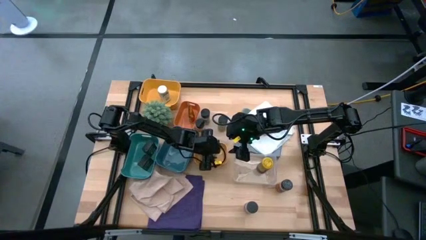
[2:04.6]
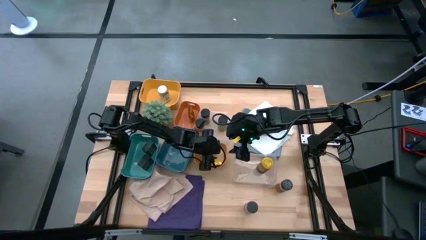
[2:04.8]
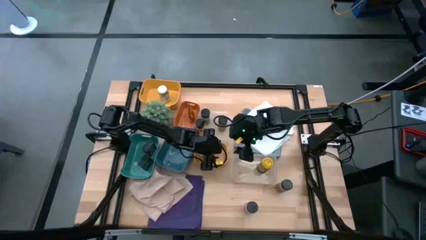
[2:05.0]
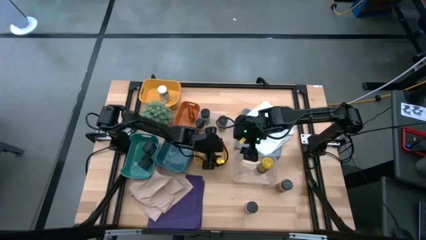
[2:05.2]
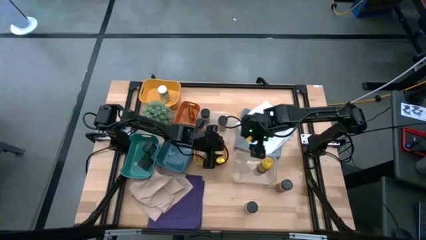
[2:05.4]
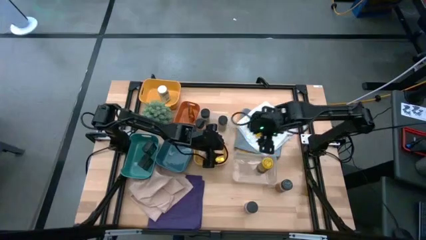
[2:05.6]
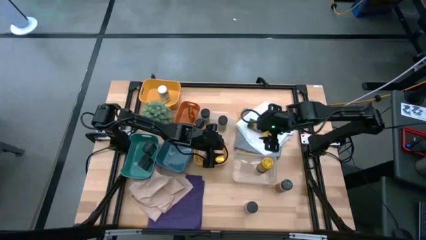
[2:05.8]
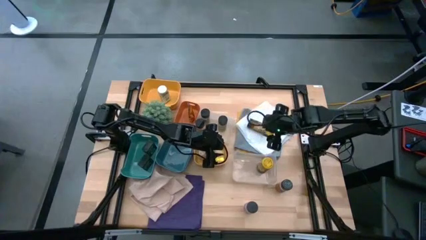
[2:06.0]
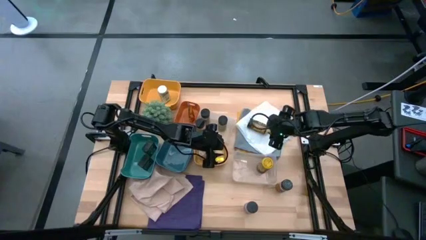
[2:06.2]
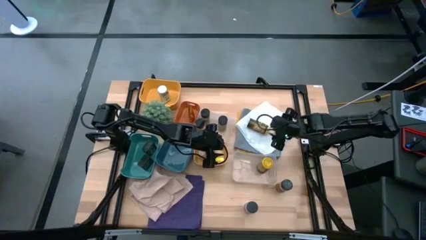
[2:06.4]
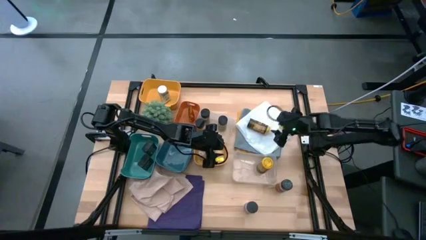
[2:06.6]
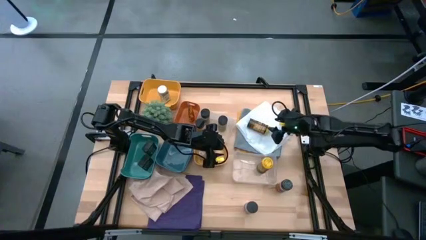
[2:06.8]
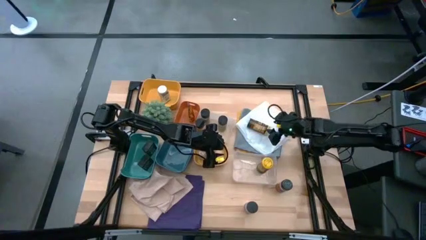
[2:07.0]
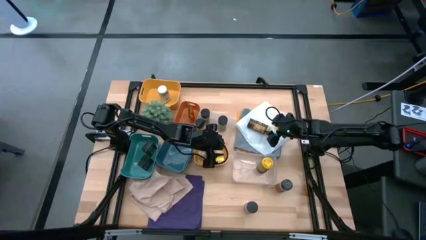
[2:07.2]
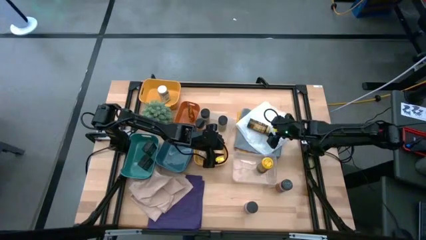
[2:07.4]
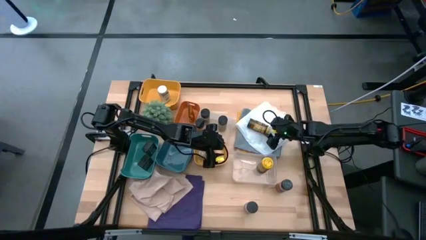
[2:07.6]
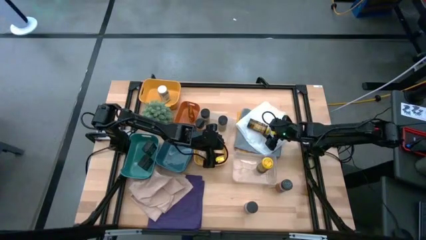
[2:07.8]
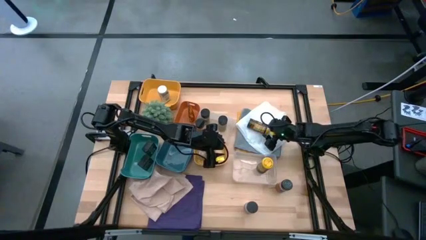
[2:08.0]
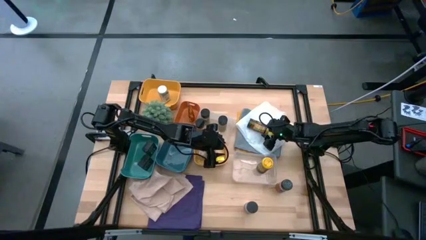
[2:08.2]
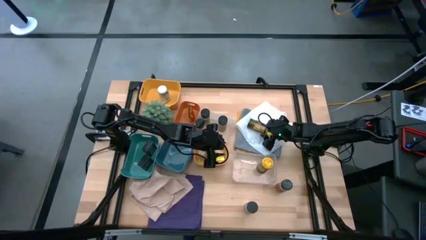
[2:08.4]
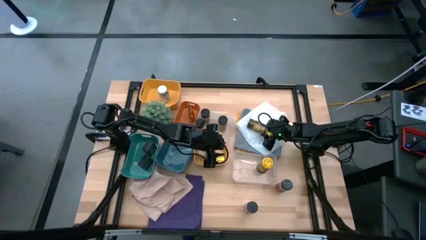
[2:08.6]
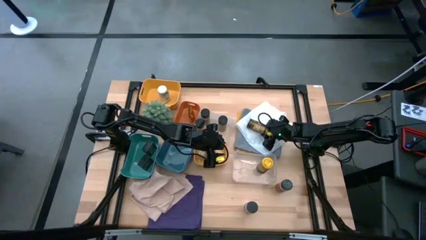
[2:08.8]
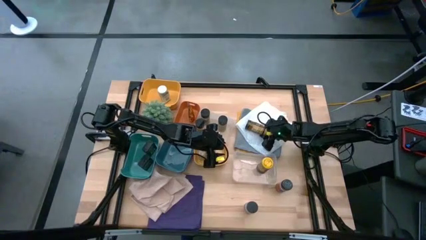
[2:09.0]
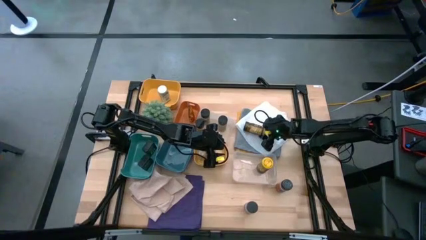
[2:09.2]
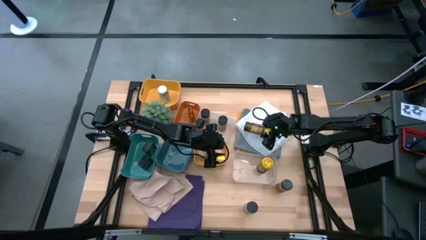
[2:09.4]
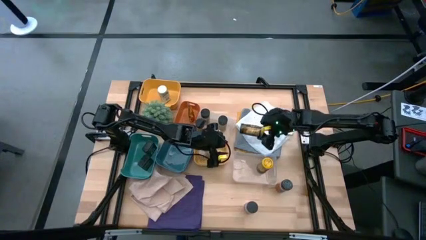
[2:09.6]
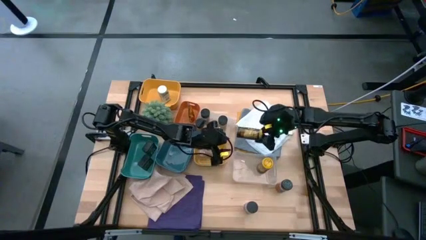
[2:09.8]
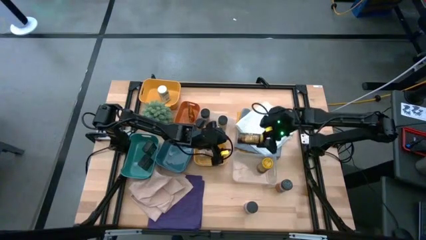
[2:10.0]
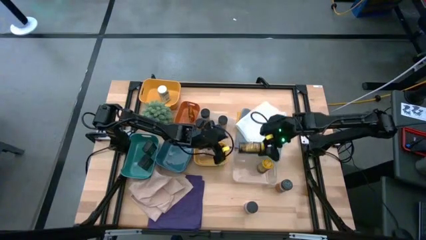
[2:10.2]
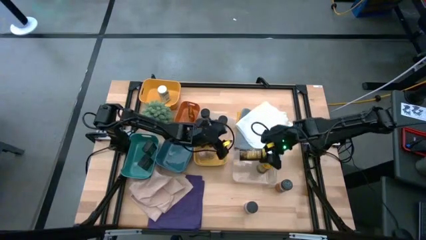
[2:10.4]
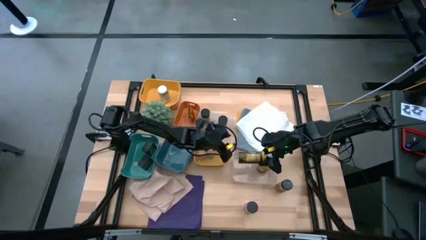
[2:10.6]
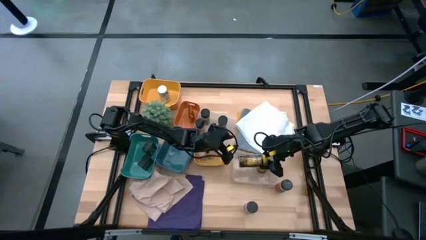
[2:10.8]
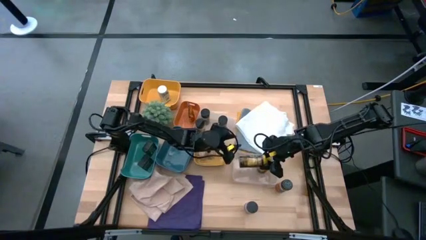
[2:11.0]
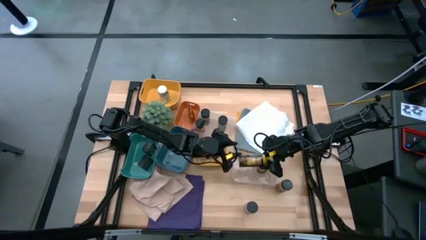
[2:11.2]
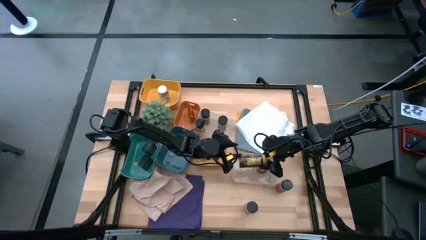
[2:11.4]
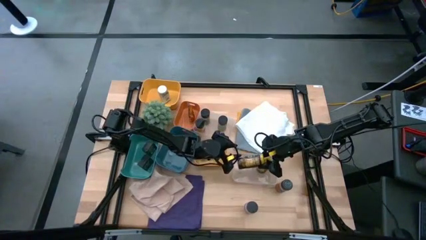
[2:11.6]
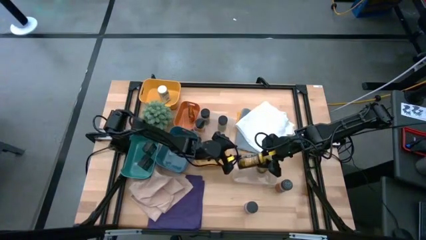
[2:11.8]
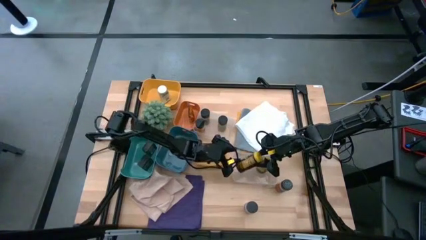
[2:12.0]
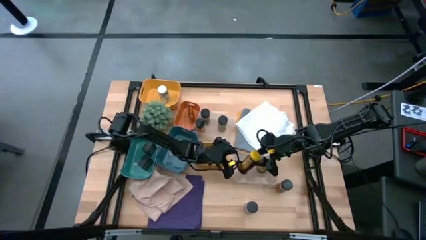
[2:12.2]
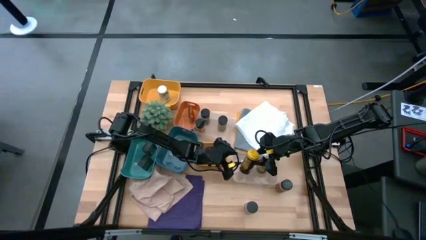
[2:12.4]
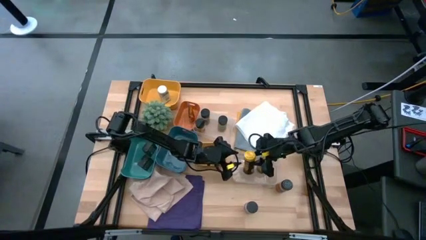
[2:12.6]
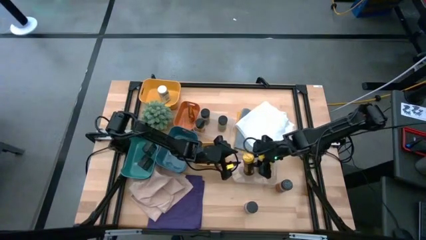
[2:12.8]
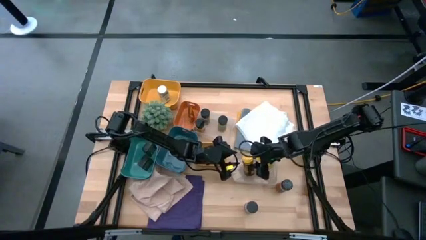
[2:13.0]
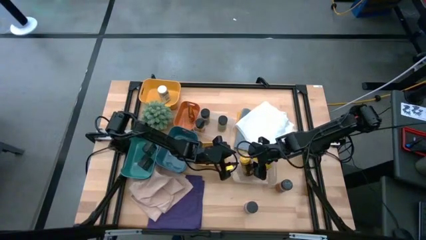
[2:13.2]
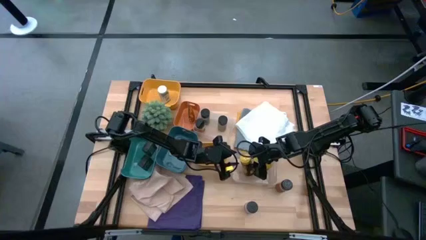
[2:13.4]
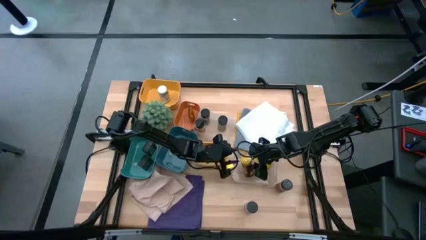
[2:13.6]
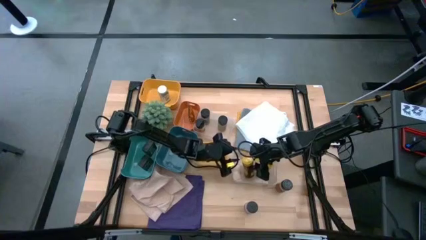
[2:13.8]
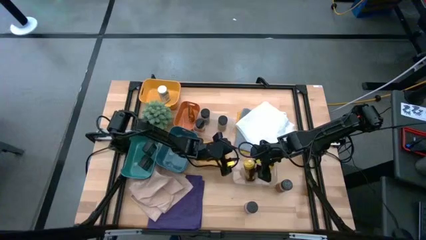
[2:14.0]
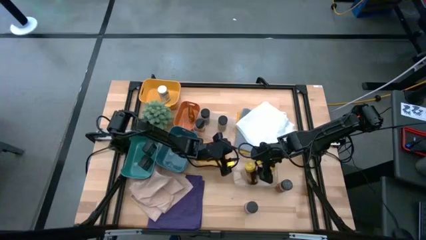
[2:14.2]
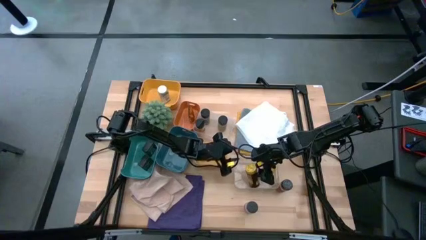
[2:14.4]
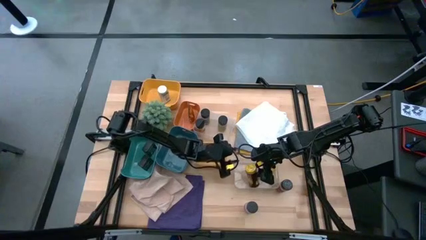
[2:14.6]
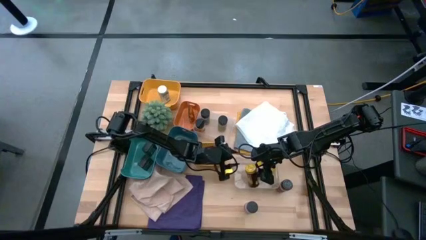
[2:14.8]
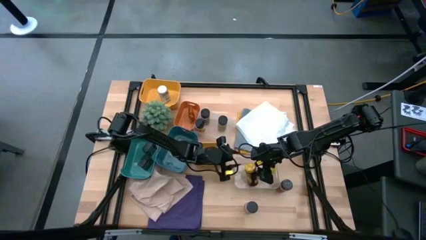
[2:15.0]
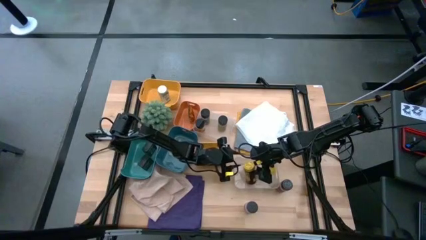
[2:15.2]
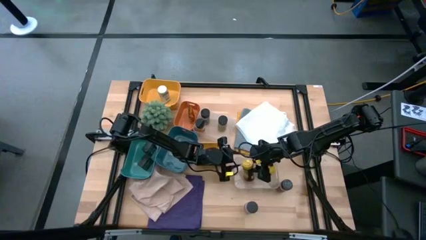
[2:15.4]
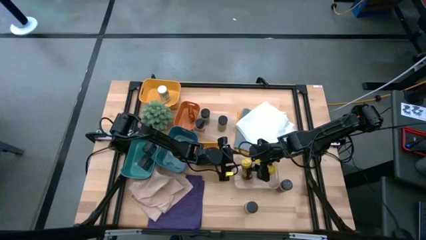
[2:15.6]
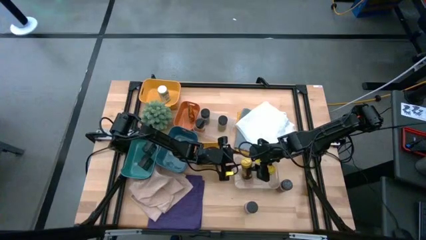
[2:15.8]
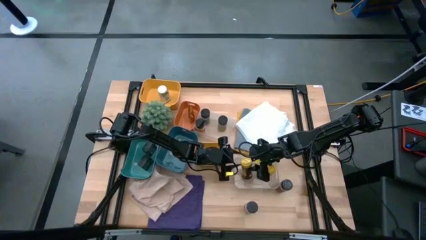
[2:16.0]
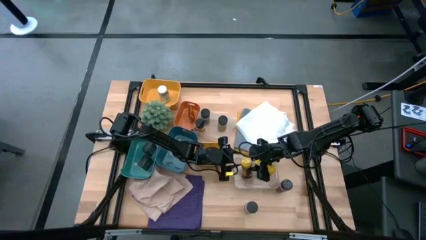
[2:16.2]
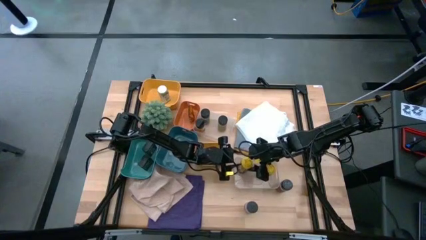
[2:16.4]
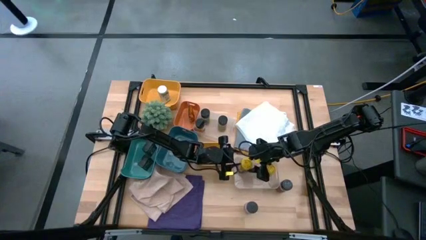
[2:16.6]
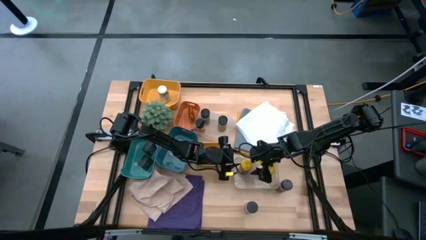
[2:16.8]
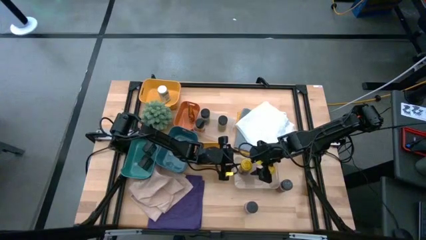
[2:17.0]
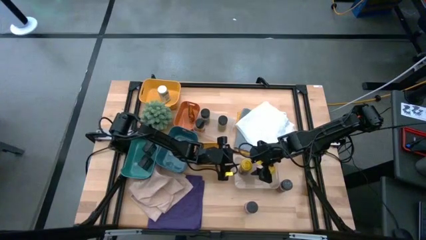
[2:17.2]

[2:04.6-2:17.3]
Task: Sort spices by type
Put the yellow seasoning bottle into the bottom transparent bin

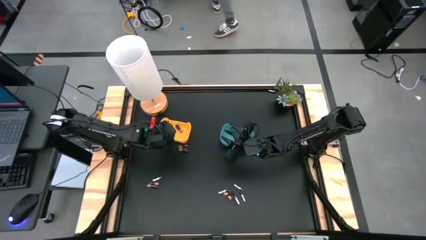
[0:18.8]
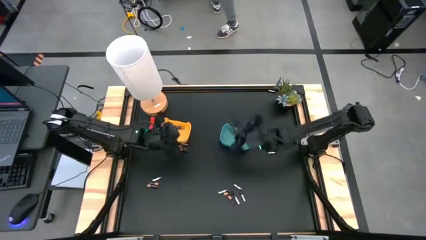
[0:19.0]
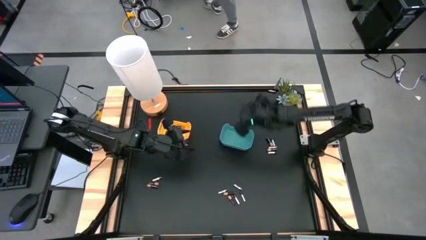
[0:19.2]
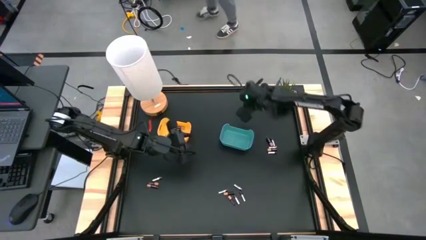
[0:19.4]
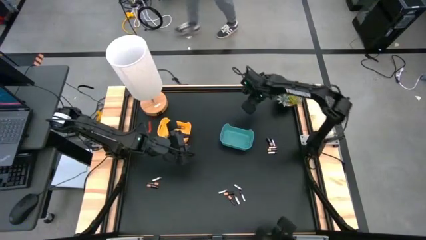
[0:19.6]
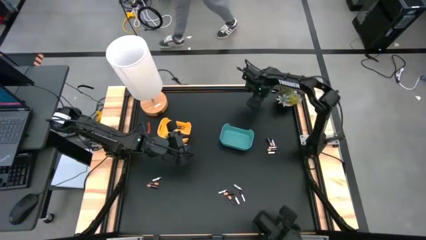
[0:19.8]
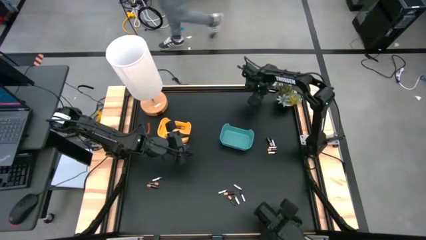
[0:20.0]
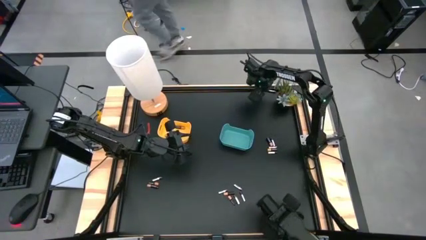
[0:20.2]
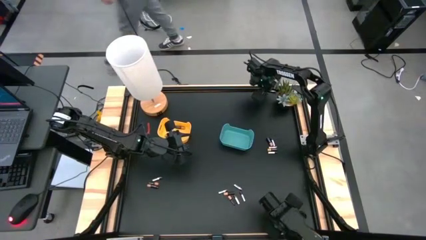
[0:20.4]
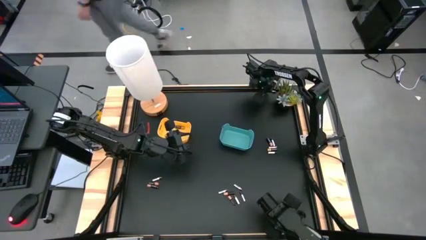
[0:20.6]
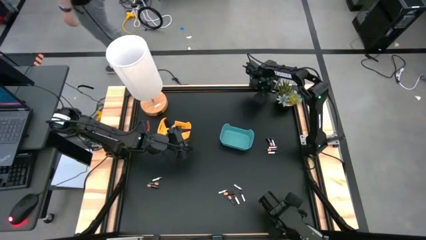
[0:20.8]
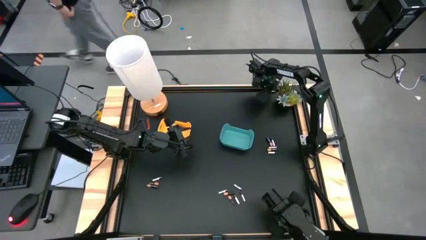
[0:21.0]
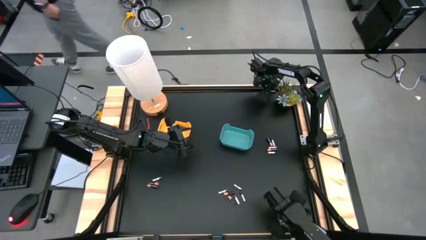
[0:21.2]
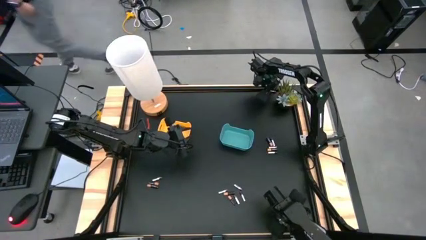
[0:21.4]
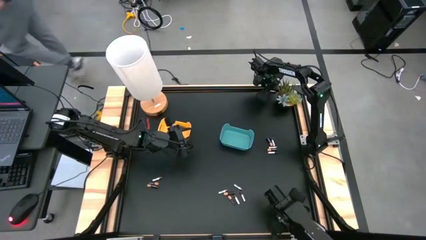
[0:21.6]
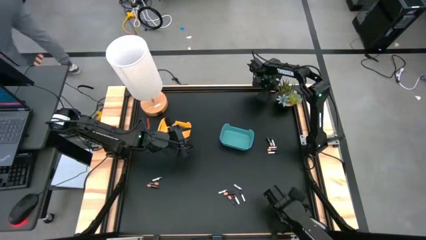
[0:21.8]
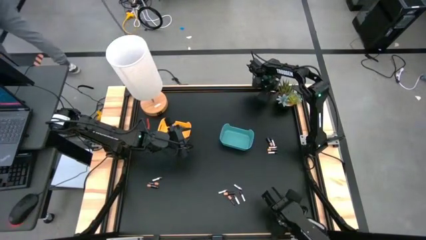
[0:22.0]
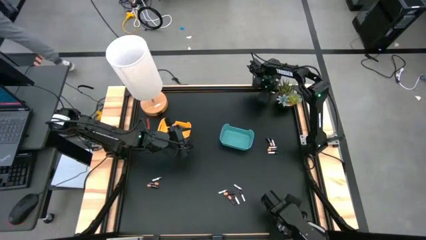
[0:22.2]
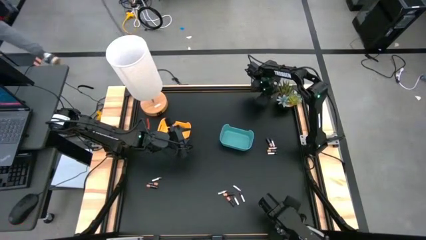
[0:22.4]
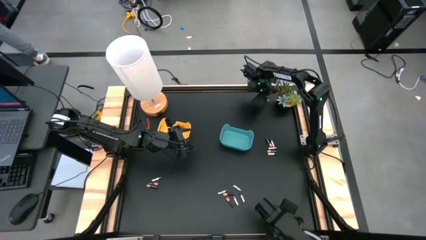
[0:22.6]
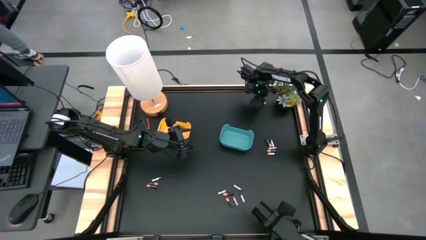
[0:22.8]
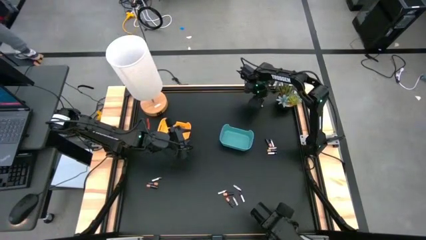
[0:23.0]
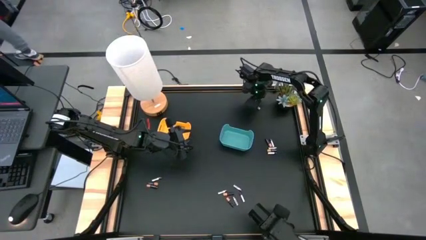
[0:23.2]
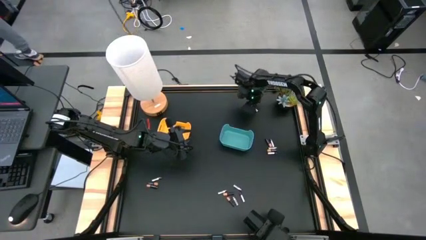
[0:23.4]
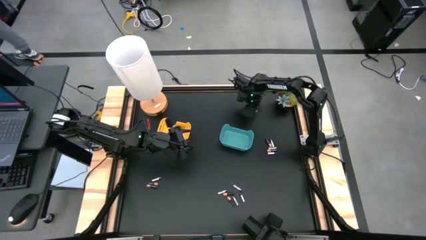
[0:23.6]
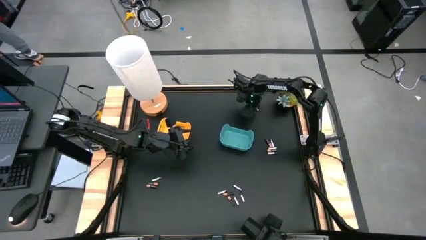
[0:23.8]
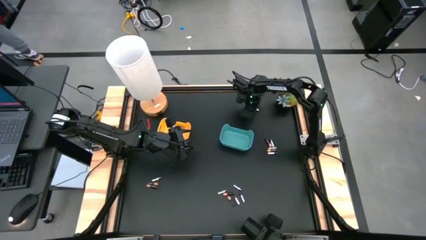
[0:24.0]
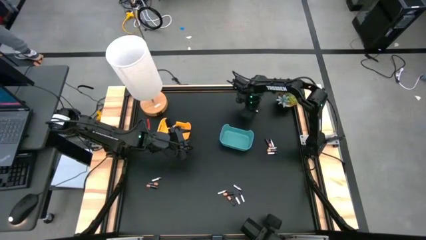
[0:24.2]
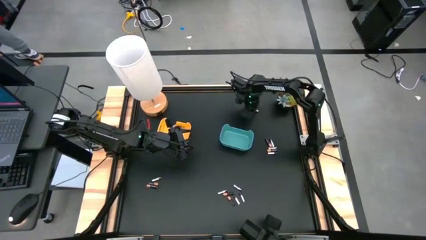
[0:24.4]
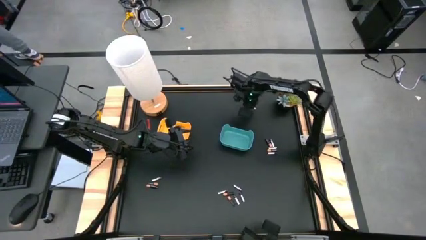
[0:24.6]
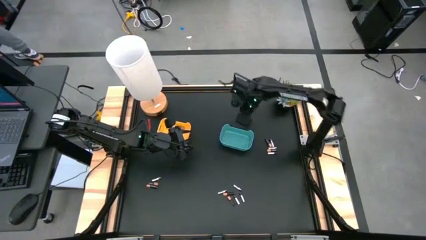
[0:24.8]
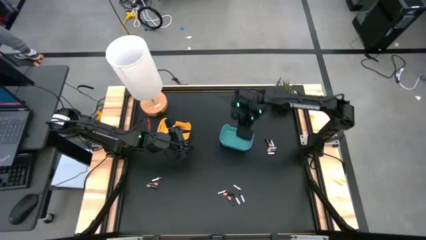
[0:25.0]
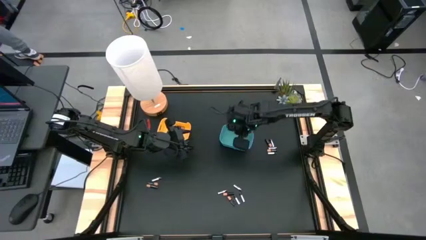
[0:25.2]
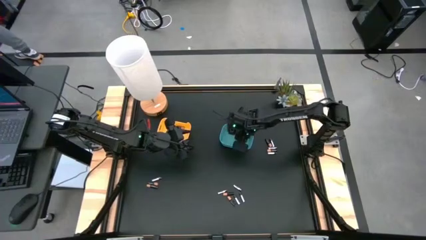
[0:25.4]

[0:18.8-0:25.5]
Task: Sort batteries
Put the silver battery into the blue bin
